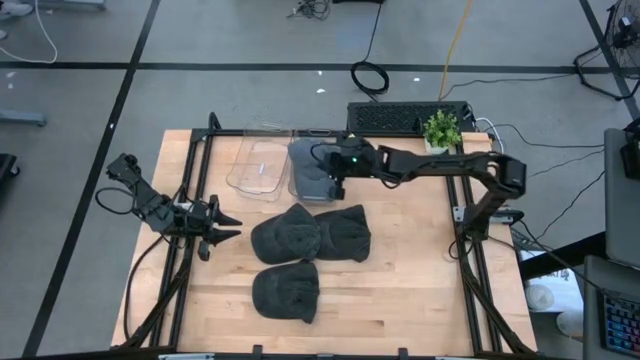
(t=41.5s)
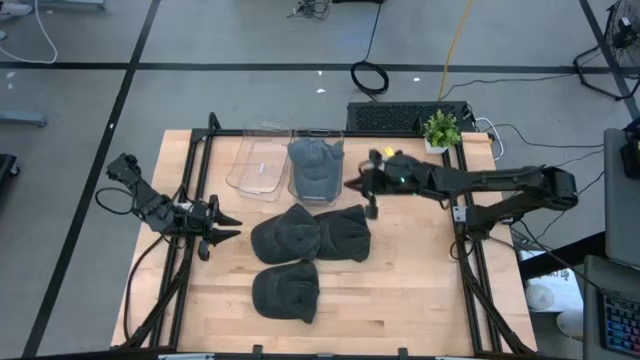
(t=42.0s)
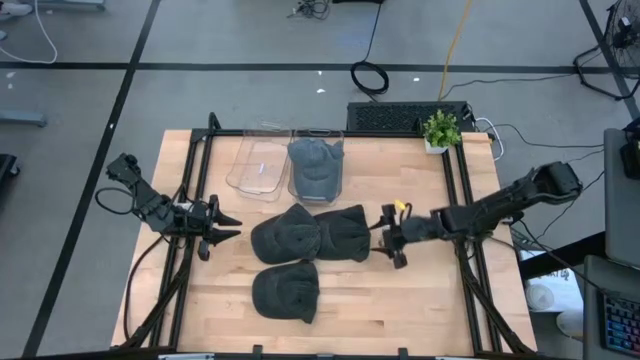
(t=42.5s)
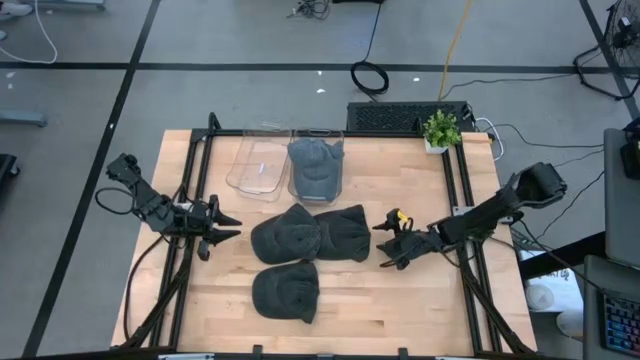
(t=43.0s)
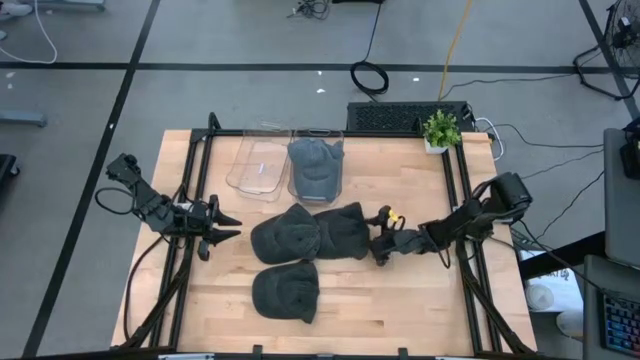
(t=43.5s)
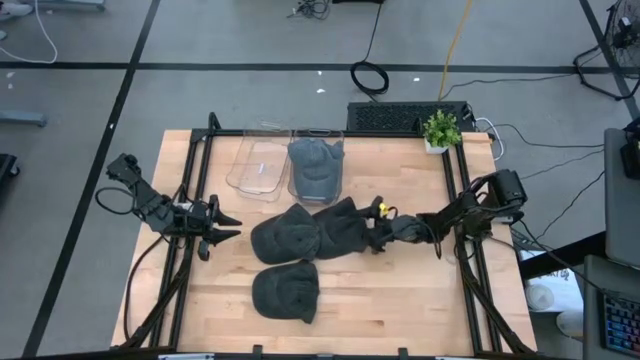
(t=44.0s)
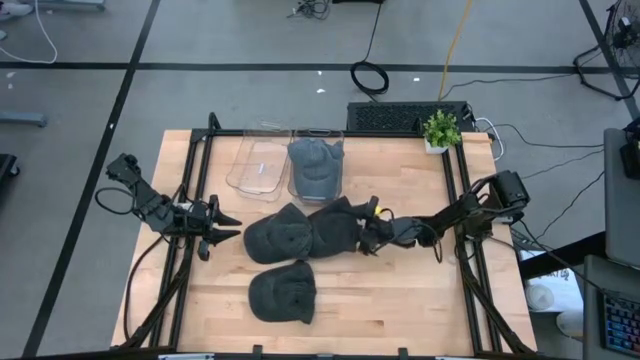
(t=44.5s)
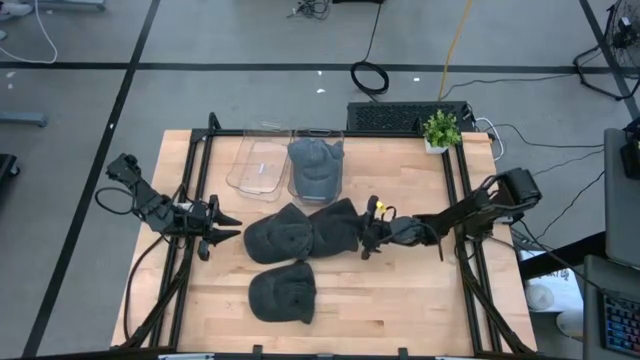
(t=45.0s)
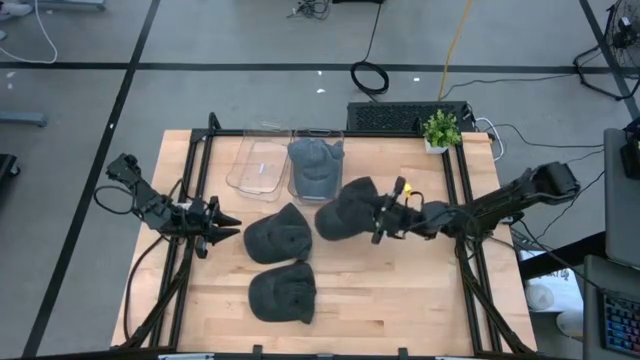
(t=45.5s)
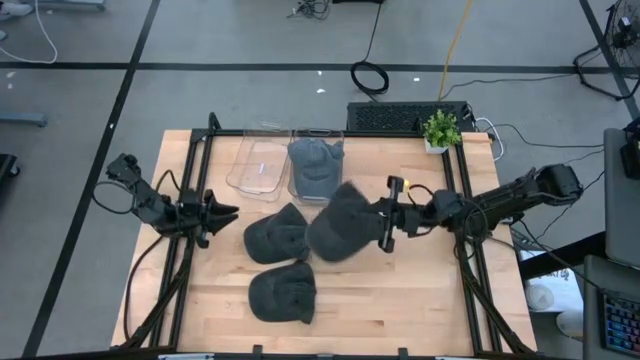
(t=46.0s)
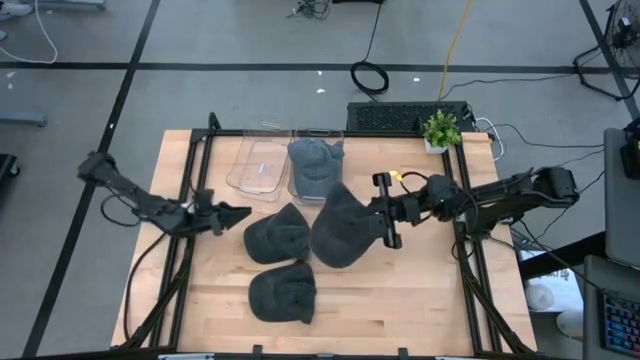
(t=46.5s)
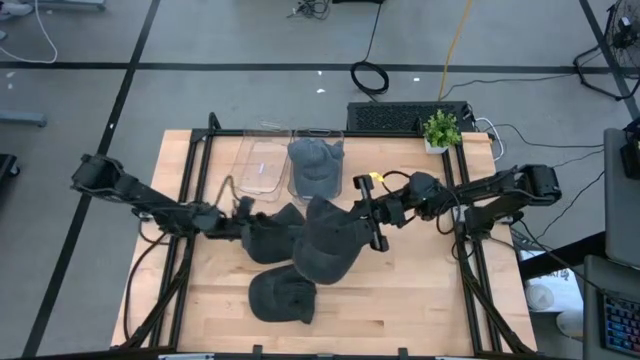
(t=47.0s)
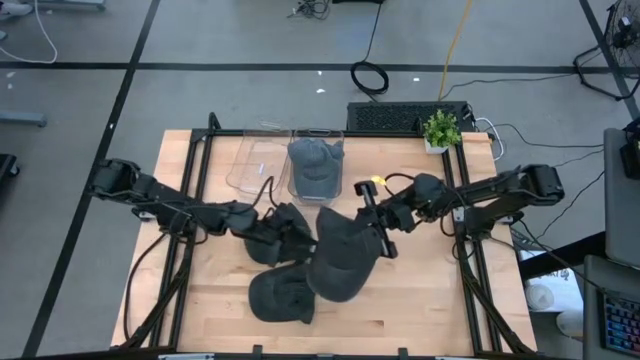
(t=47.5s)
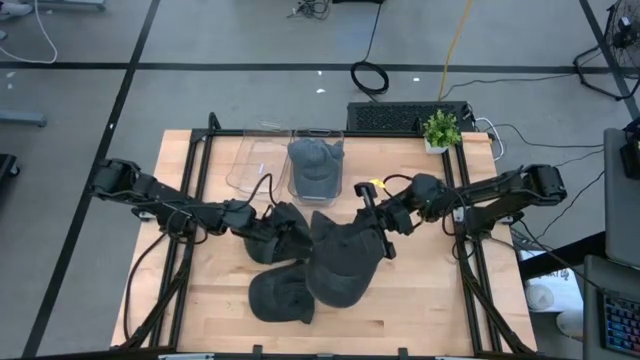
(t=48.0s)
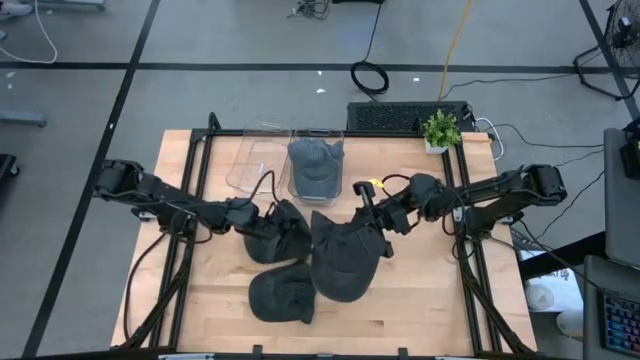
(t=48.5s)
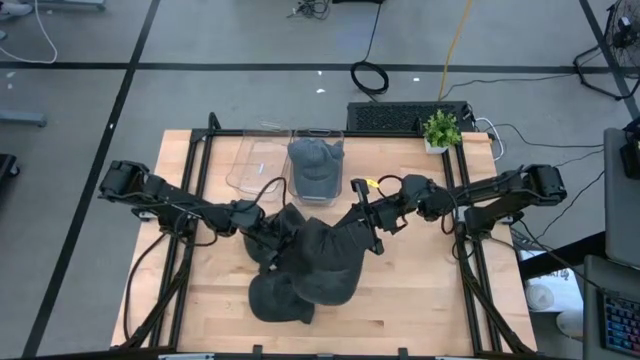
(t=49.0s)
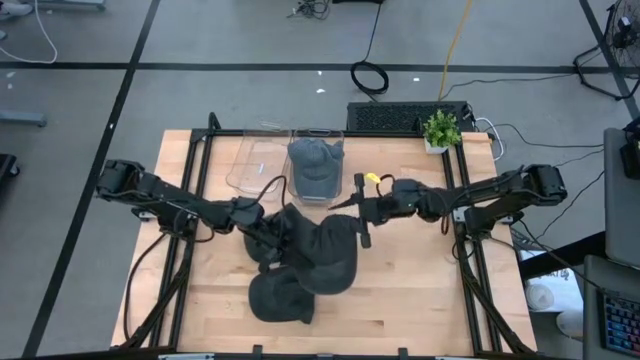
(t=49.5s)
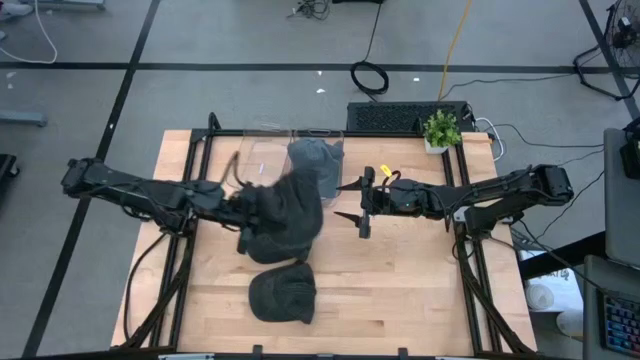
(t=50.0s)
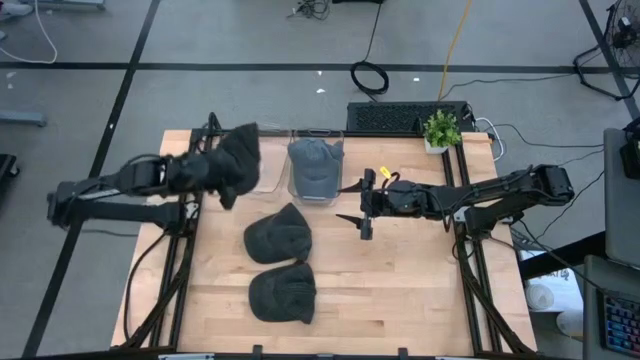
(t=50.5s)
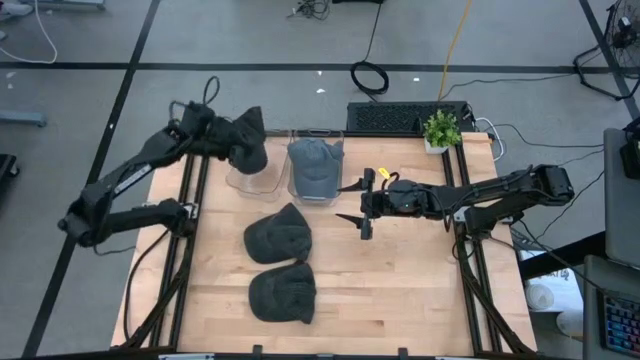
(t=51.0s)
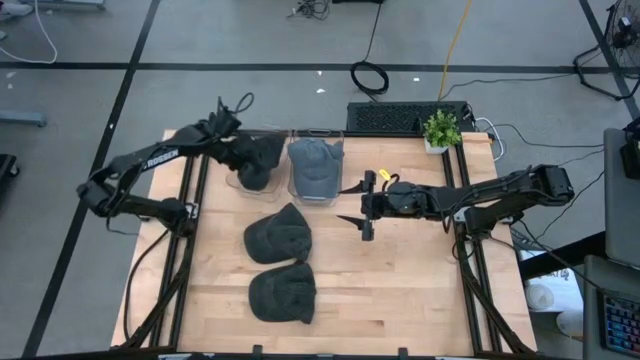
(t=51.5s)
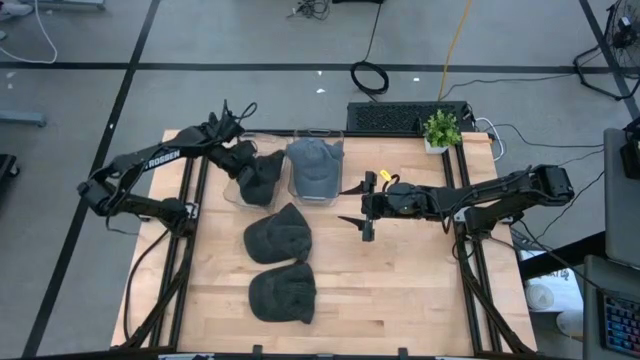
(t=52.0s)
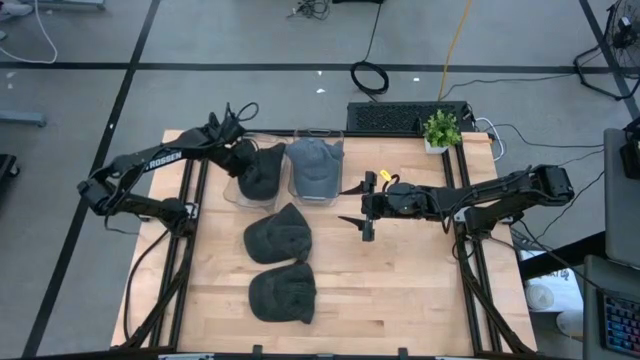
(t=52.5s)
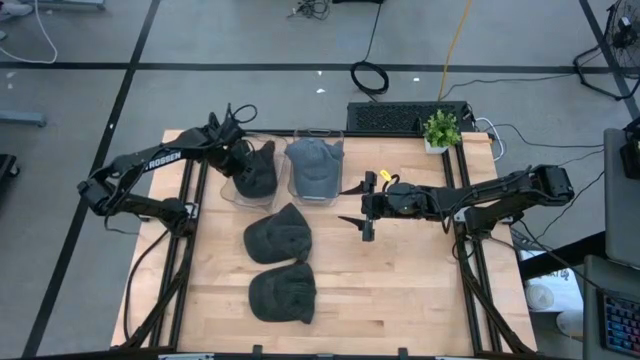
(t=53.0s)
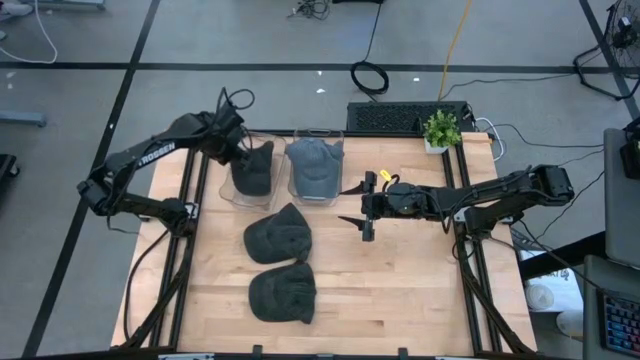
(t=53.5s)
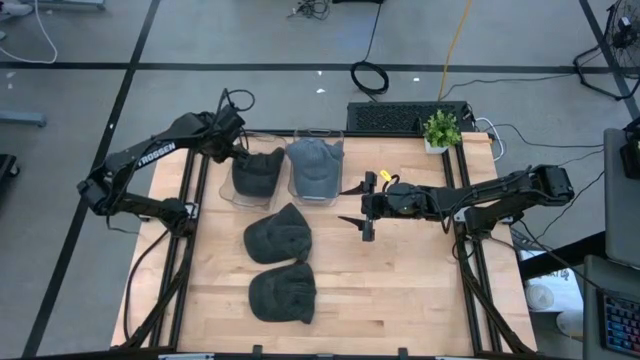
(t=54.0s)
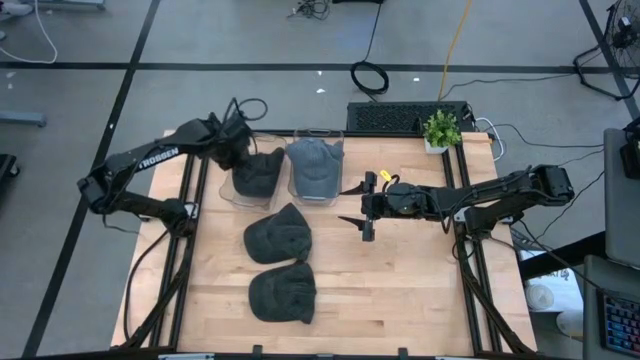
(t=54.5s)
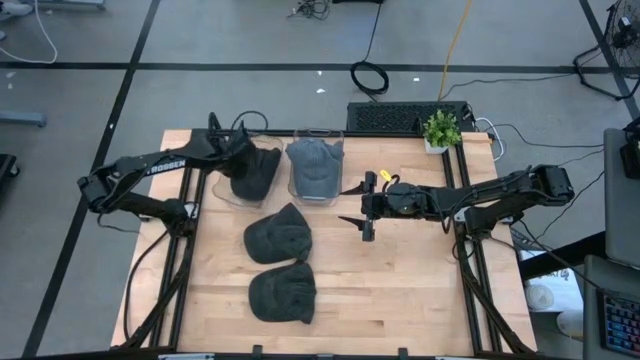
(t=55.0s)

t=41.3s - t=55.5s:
Task: Pick & Place hat
Put the top right black cap into the left transparent bin

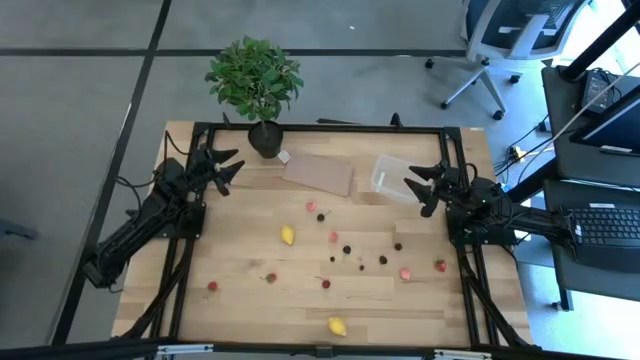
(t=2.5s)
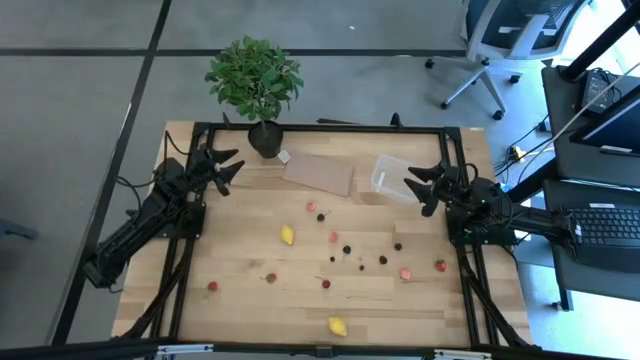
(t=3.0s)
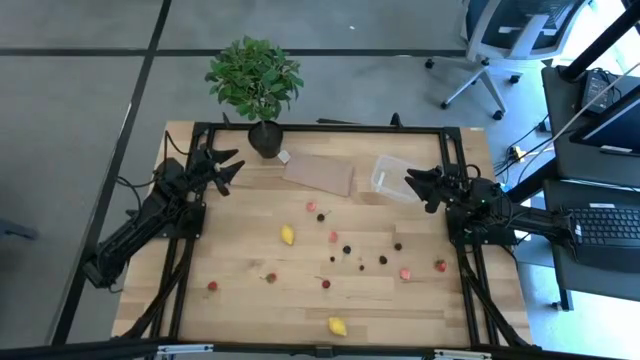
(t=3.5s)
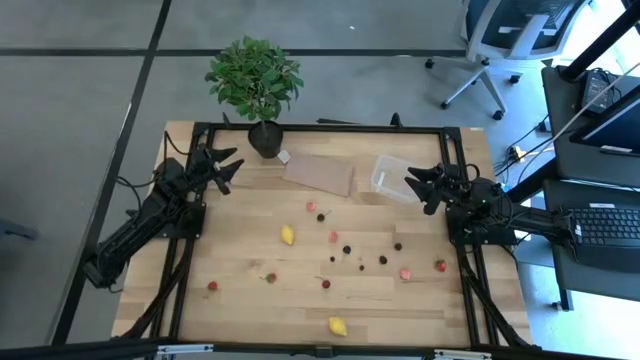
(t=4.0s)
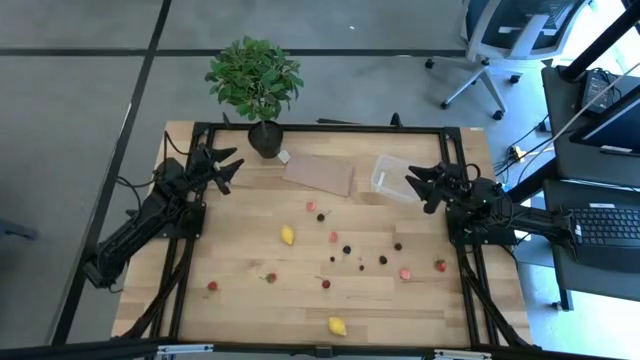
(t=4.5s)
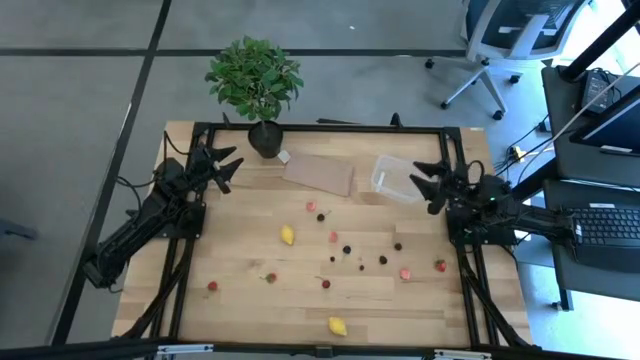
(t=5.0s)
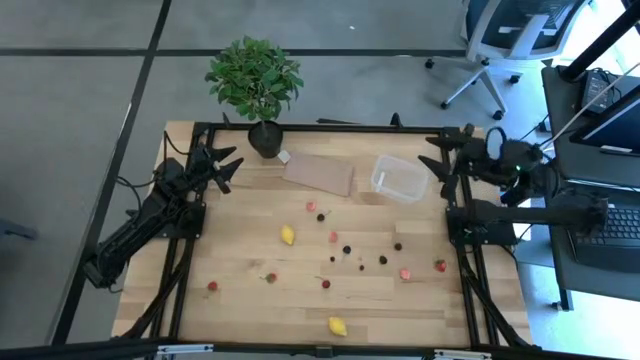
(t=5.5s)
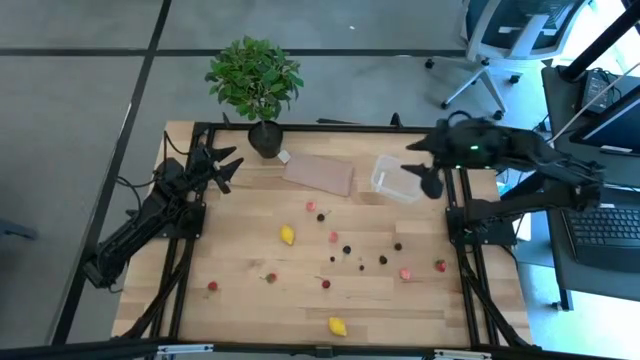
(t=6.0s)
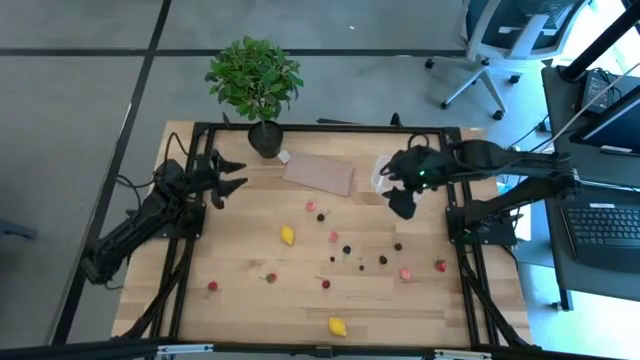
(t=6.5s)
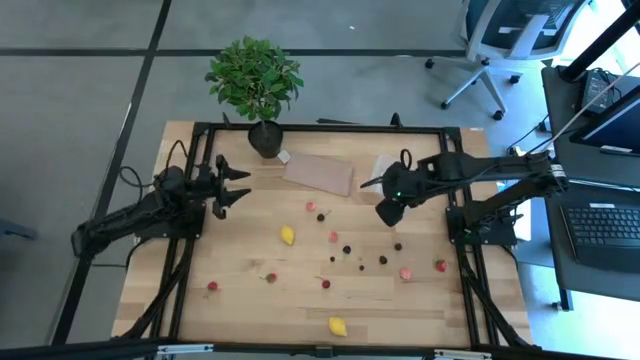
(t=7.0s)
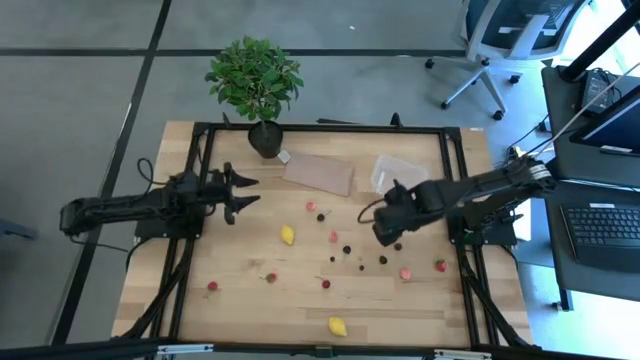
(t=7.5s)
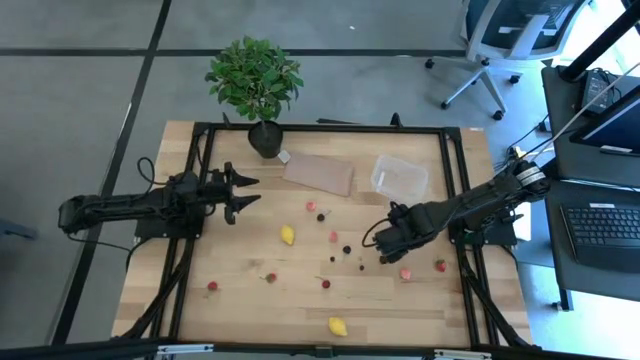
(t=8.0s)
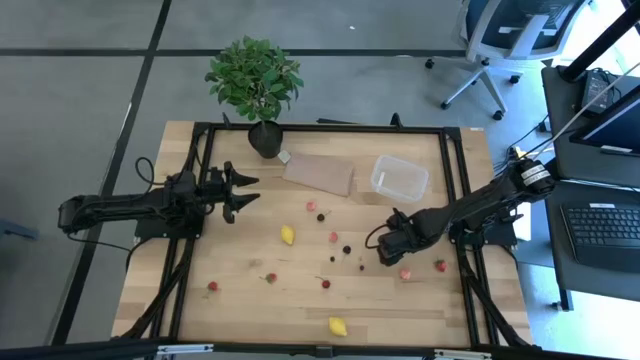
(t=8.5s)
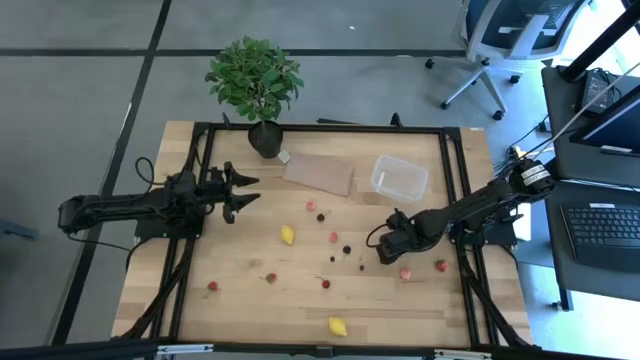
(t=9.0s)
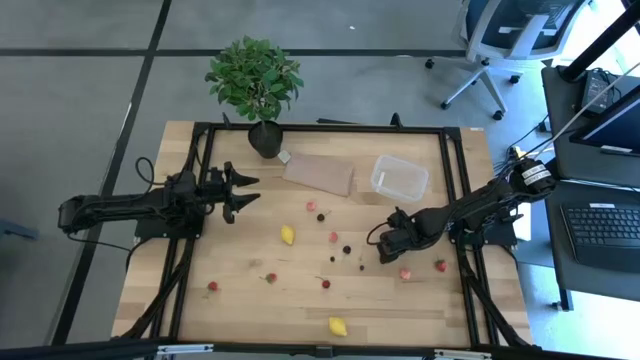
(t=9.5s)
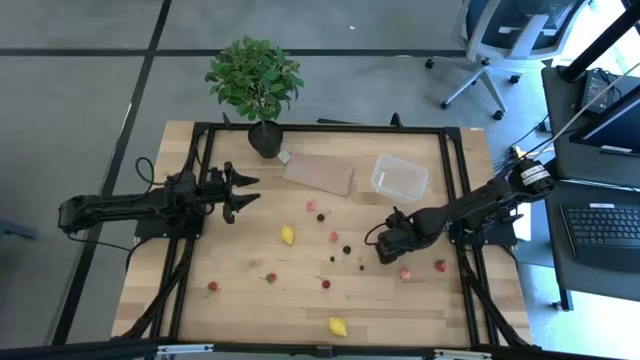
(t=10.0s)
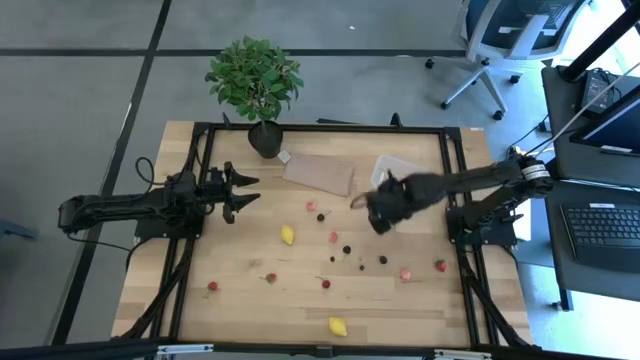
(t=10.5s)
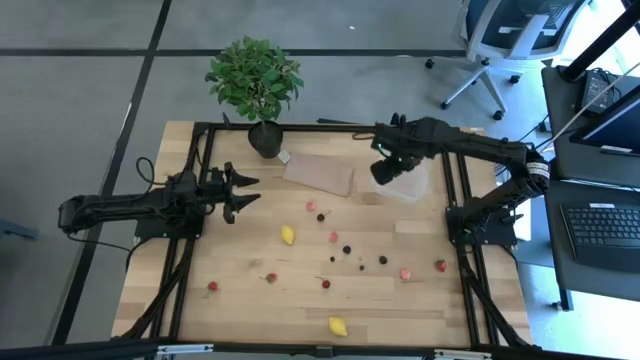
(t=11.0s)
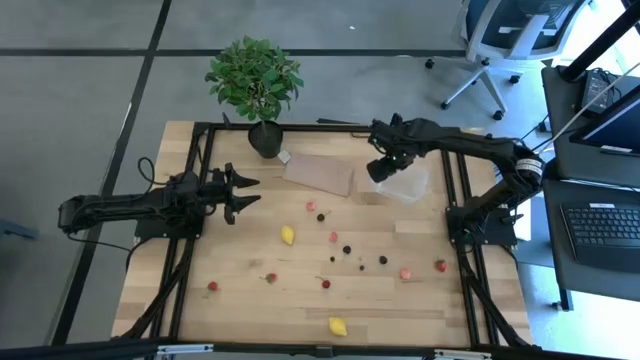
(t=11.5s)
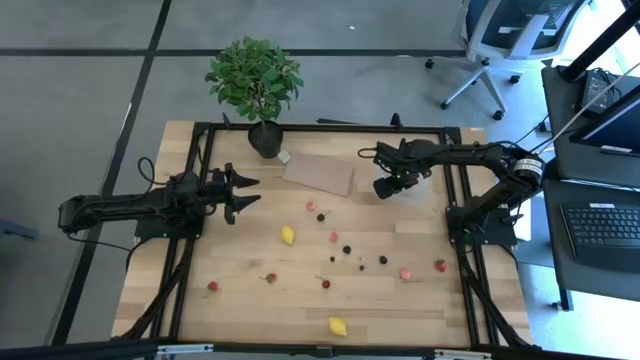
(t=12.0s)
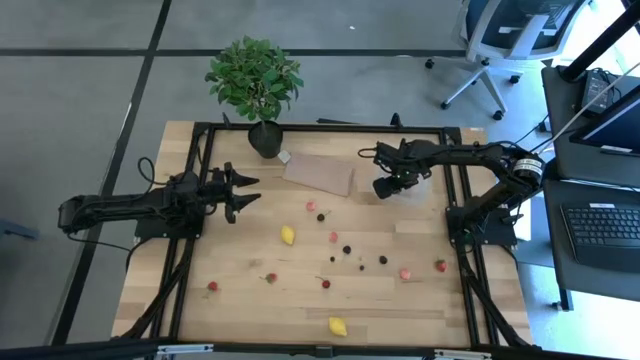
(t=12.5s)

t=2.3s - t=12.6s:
Task: Pick and placing Produce into tupperware
Put the right blackberry into the transparent container
